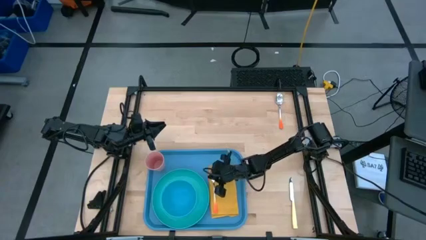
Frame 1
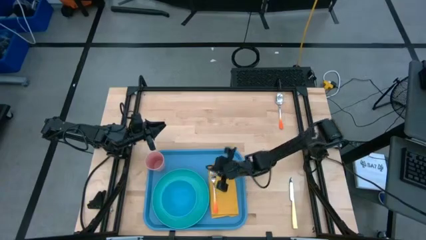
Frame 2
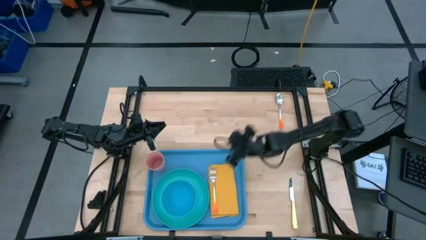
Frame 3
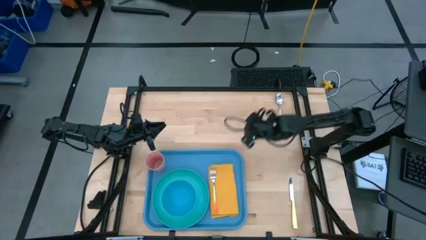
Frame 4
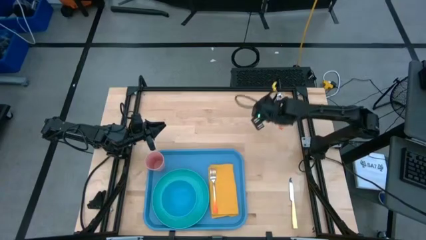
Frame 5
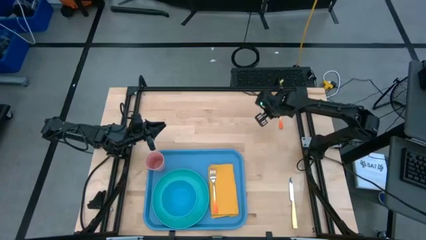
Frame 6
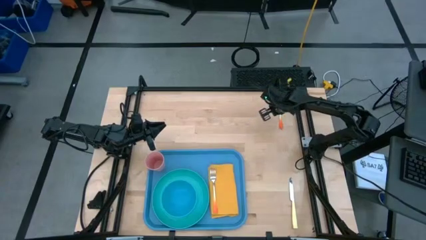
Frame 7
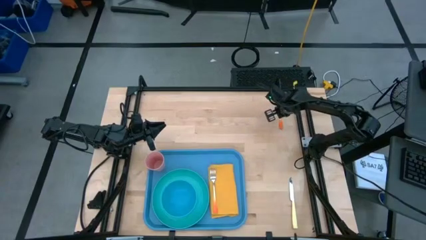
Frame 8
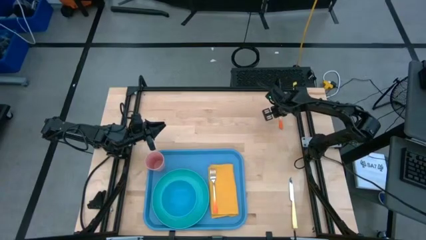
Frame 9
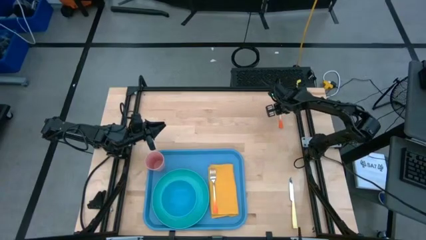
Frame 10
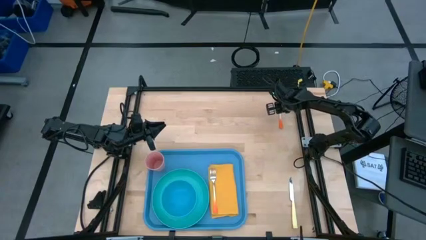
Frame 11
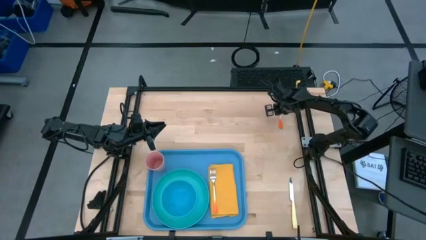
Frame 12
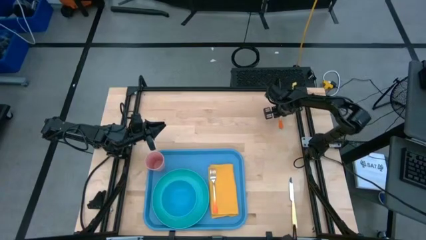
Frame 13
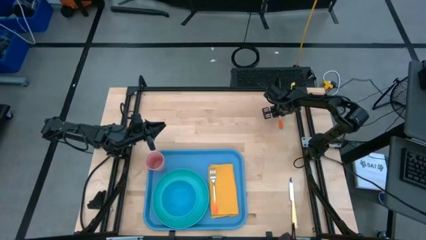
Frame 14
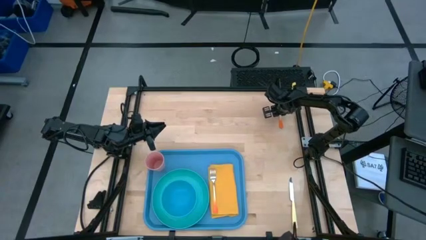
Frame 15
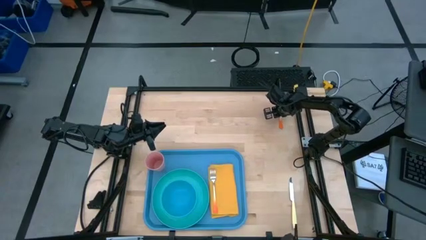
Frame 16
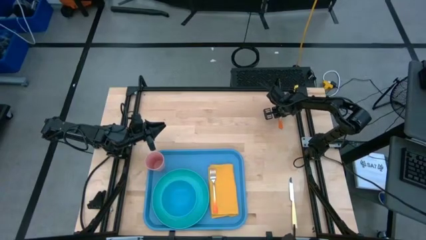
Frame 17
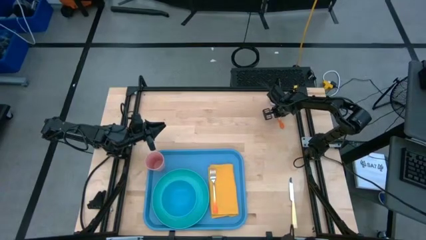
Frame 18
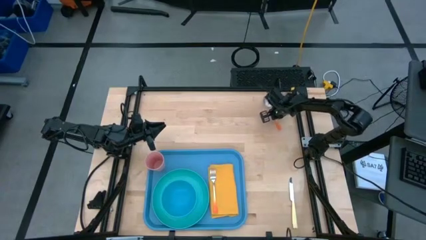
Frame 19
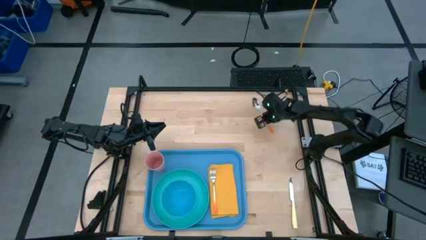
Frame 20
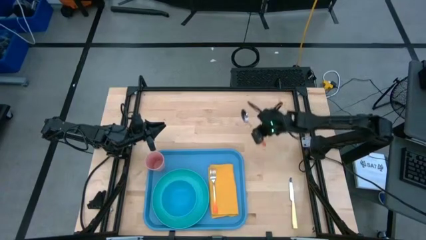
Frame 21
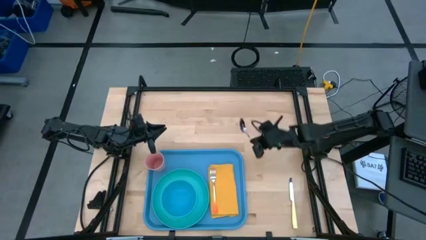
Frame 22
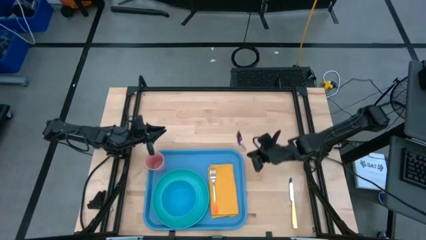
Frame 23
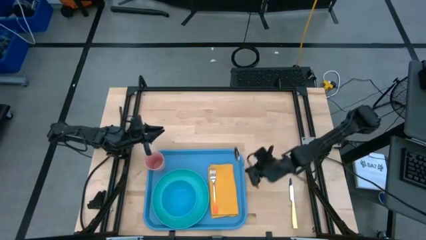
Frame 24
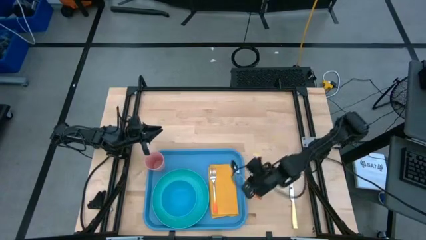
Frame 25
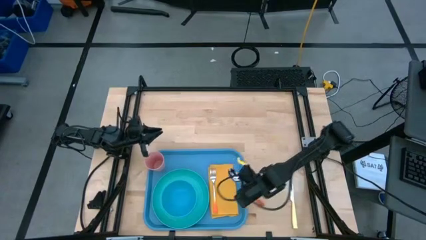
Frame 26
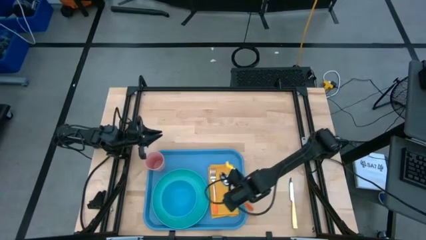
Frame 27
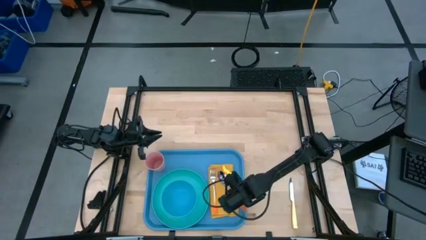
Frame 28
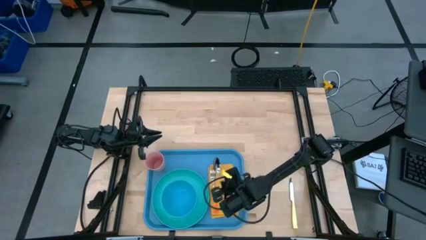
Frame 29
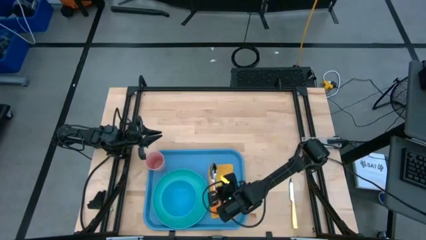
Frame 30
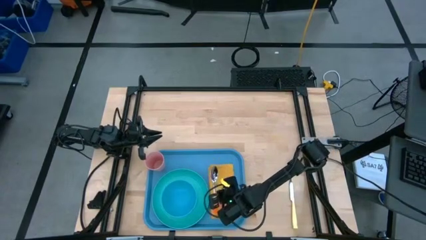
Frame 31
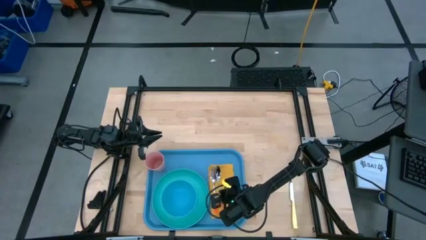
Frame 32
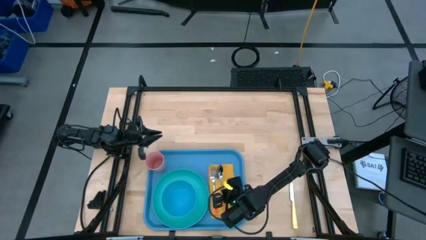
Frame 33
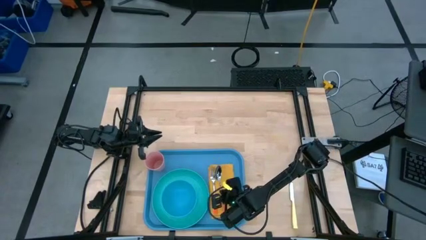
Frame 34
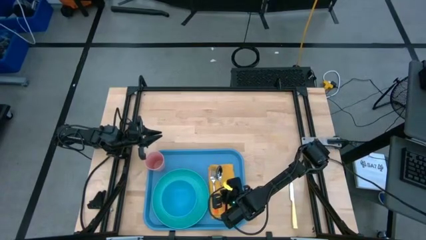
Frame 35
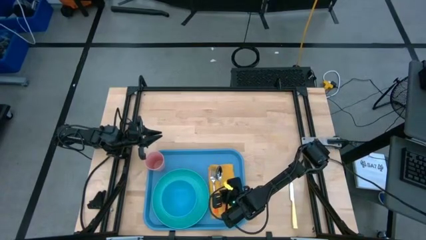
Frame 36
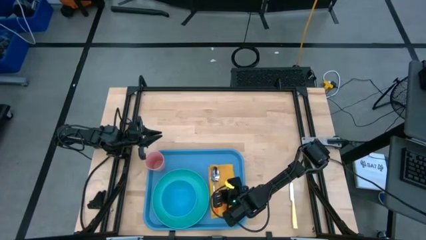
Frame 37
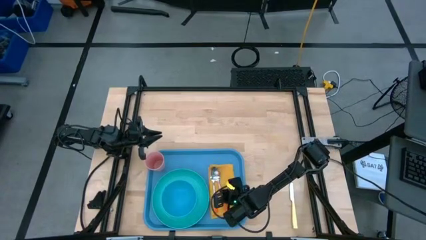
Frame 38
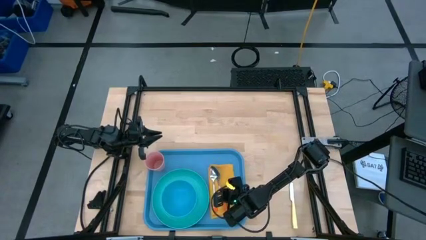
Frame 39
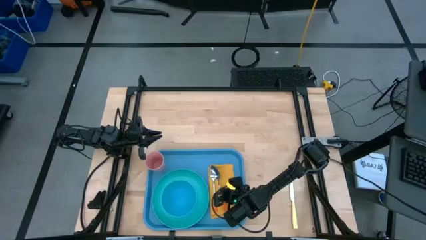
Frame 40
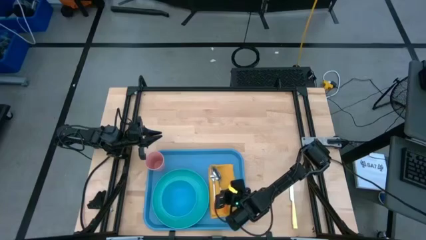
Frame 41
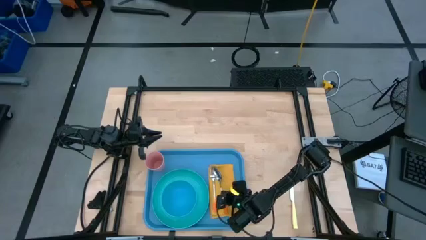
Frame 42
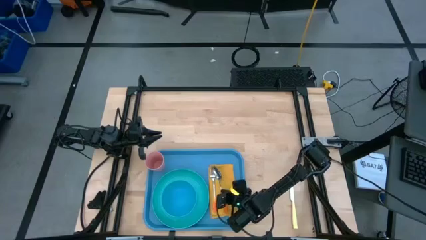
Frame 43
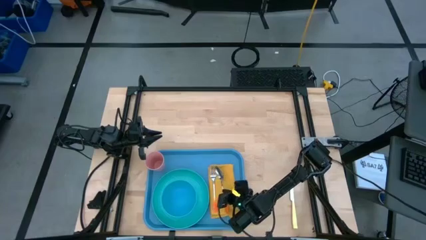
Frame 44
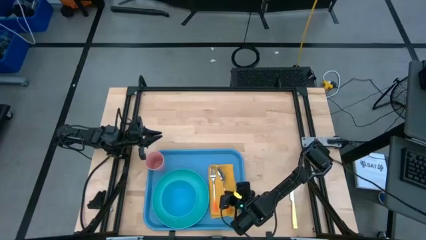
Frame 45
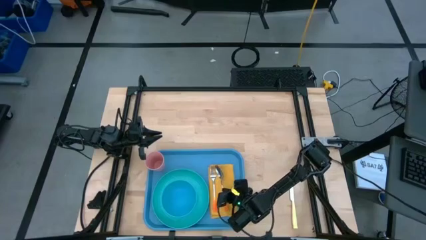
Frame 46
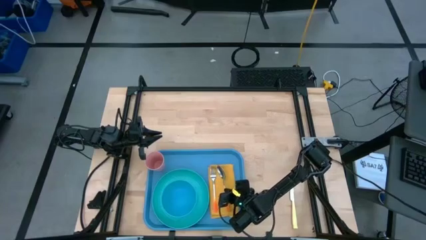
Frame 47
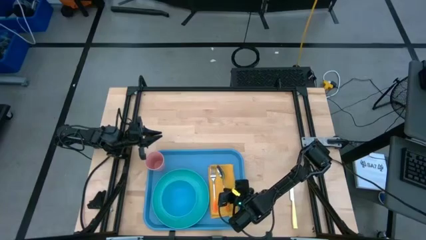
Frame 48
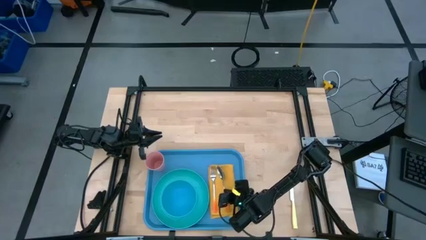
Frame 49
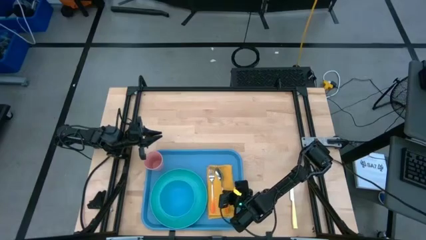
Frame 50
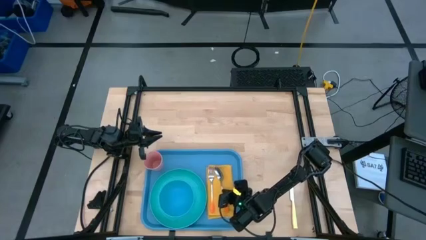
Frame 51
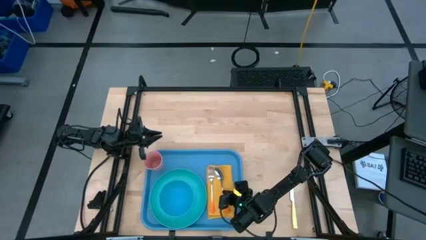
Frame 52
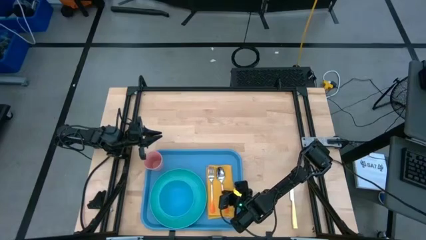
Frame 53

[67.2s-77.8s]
Task: Set up tray
Put the white orange spoon on the yellow napkin

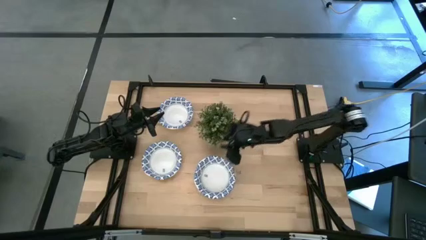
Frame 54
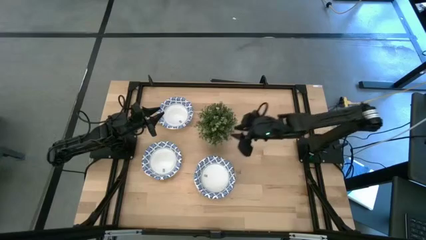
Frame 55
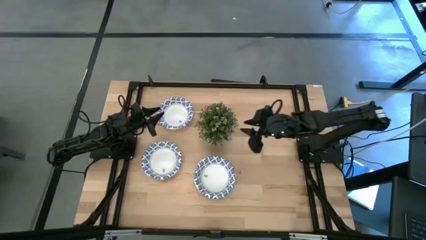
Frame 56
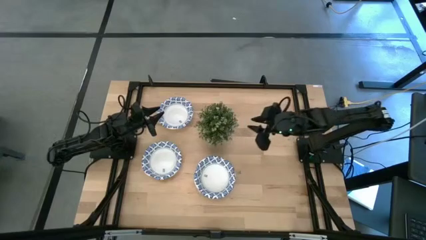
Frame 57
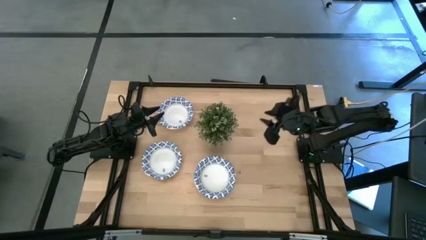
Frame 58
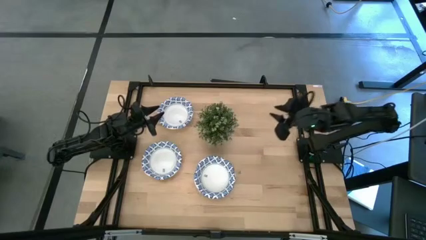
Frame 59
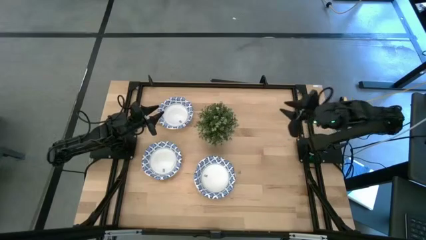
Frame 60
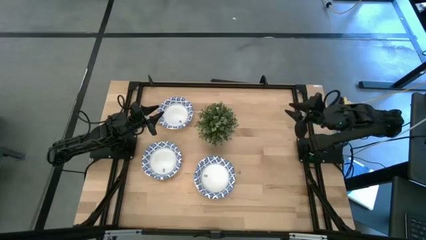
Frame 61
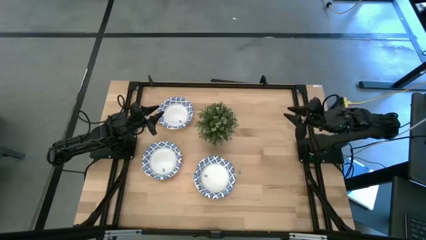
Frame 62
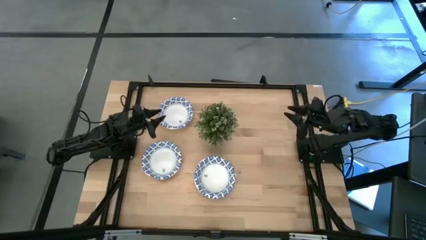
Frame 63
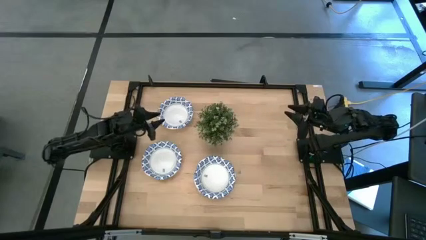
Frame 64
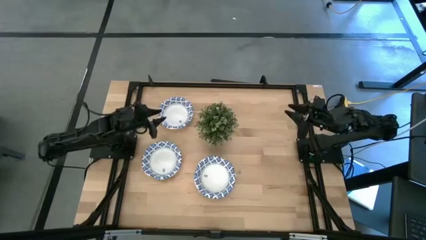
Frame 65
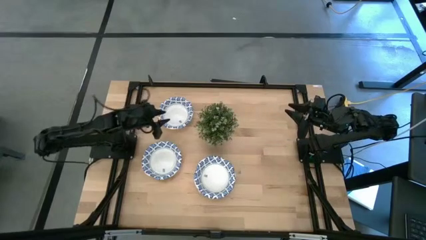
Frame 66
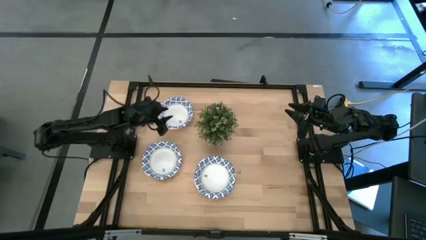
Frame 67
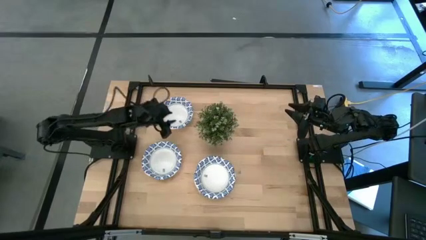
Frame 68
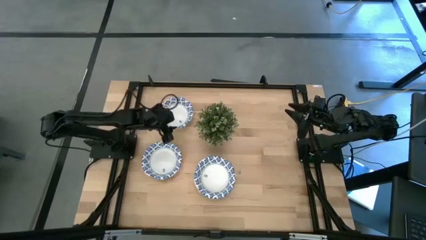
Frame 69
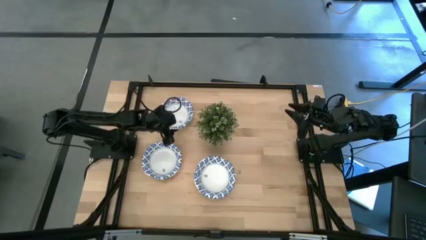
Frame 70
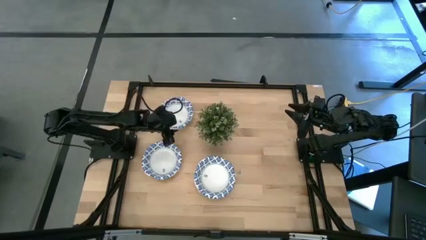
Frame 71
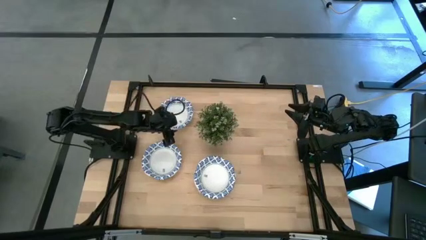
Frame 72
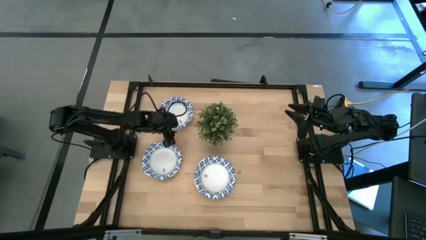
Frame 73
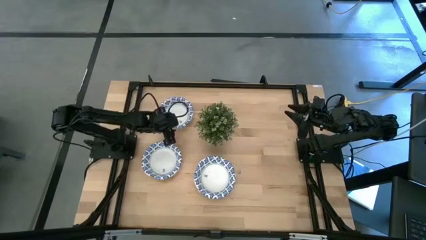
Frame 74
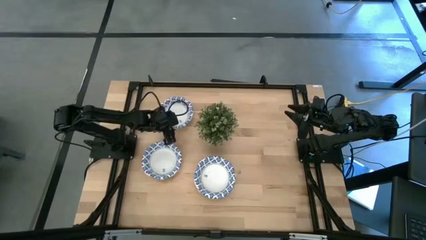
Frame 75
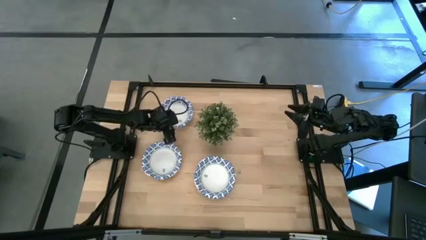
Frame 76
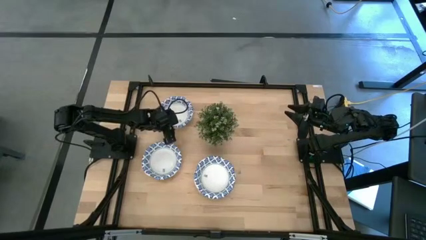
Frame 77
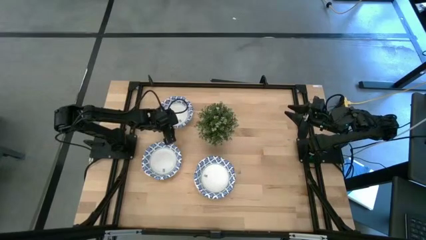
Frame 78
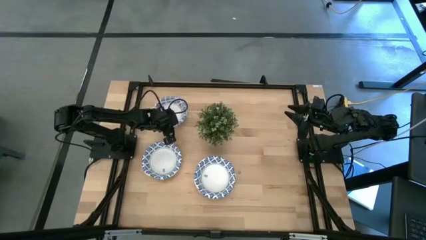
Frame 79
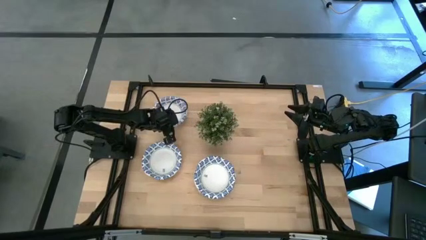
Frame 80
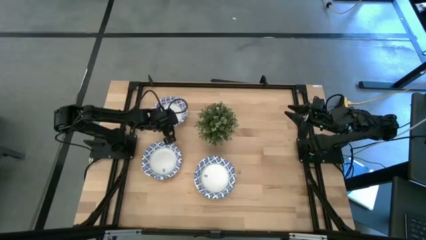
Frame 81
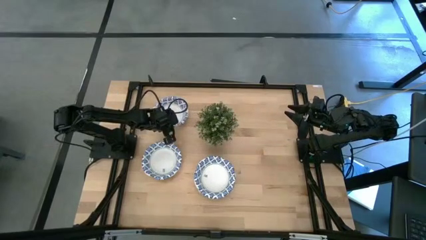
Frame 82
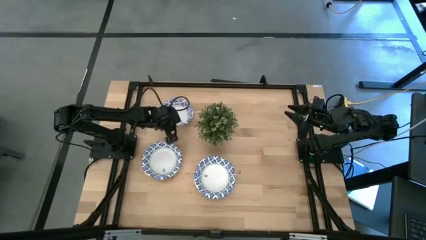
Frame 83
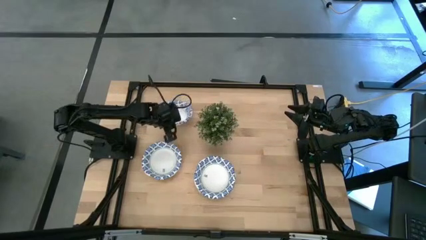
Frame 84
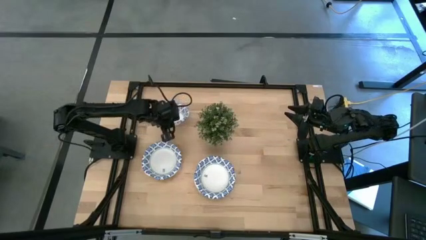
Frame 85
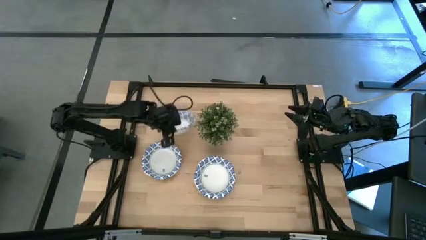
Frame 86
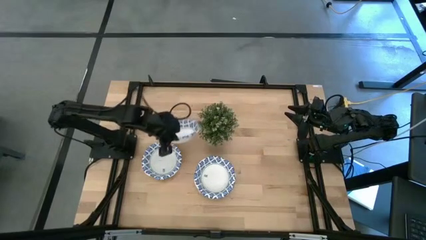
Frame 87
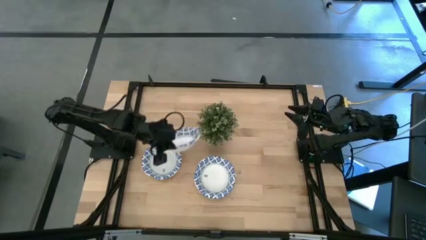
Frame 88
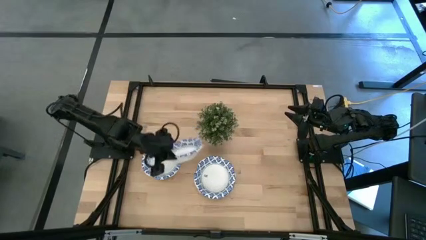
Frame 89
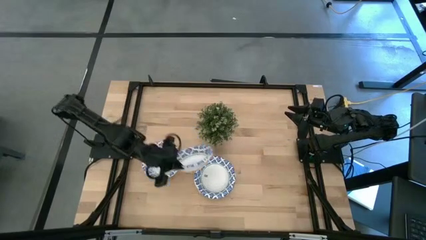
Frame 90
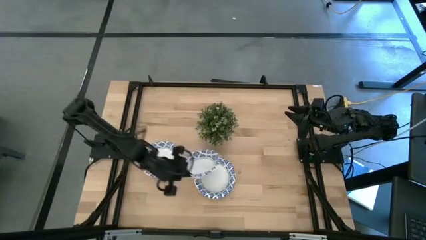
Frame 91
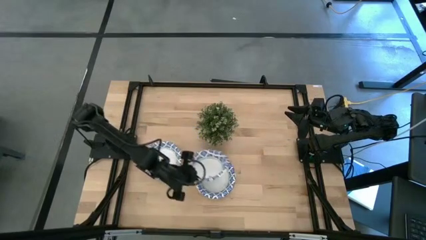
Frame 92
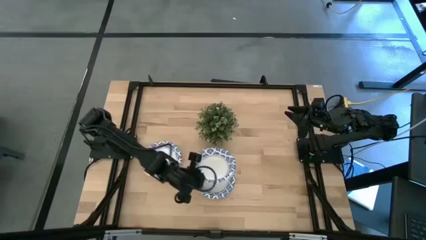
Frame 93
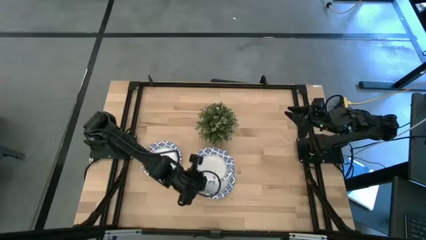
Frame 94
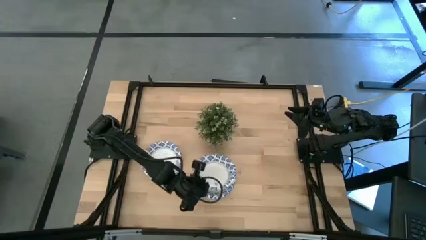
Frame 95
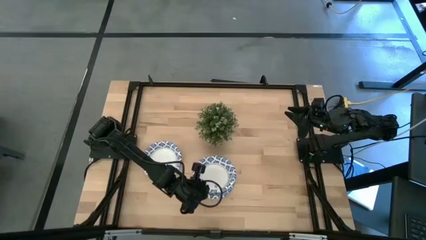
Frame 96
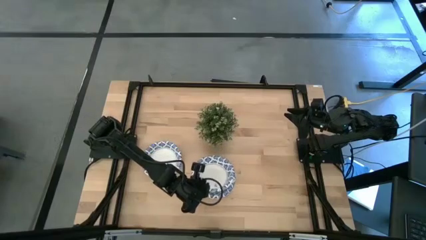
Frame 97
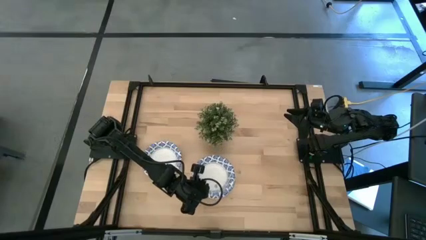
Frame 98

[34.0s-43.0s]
Task: Nest bowls inside each other
Stack the white bowl on top of the other white bowl
